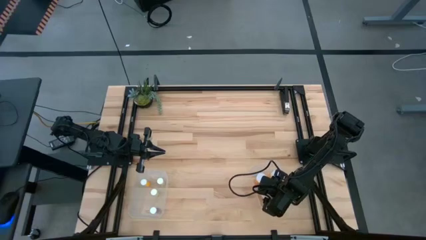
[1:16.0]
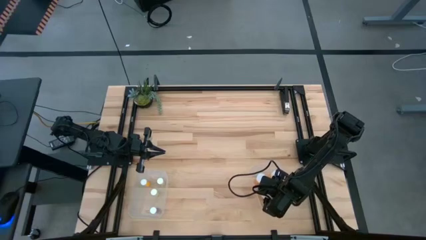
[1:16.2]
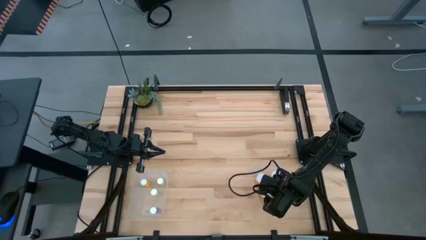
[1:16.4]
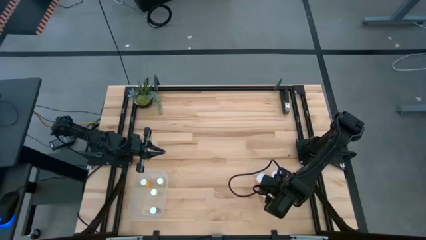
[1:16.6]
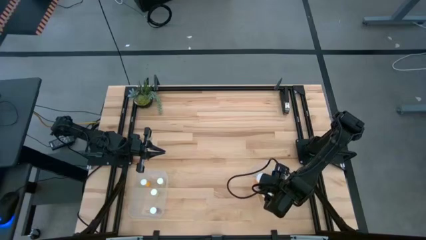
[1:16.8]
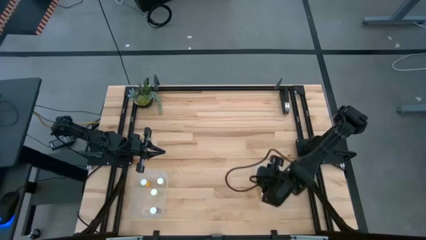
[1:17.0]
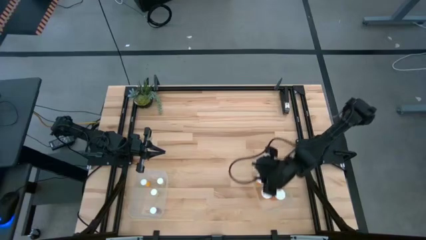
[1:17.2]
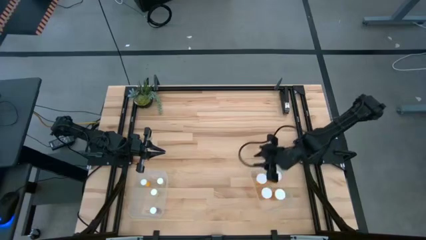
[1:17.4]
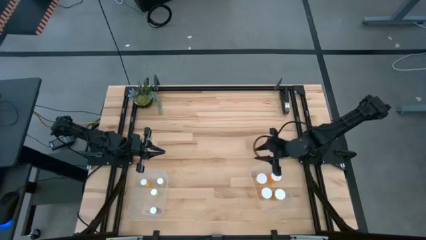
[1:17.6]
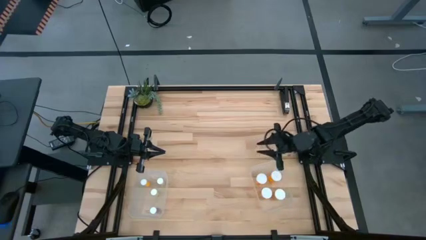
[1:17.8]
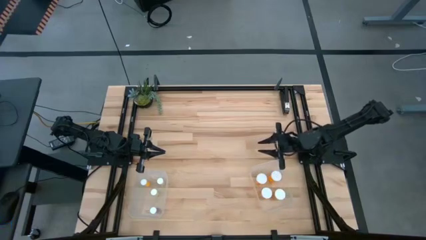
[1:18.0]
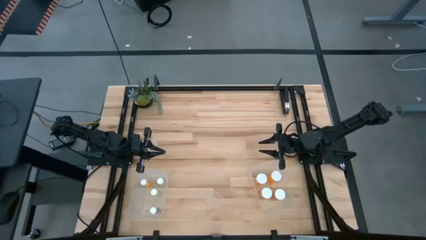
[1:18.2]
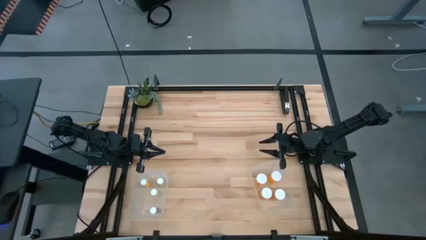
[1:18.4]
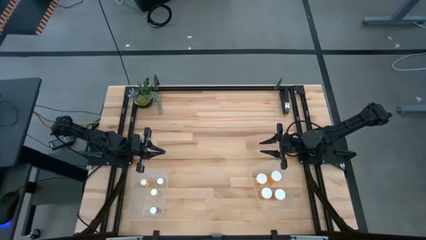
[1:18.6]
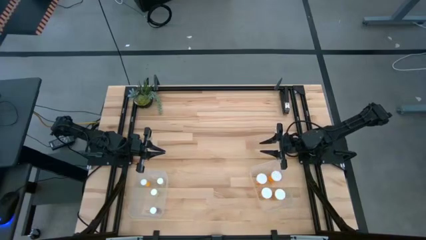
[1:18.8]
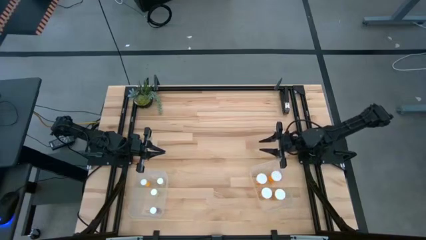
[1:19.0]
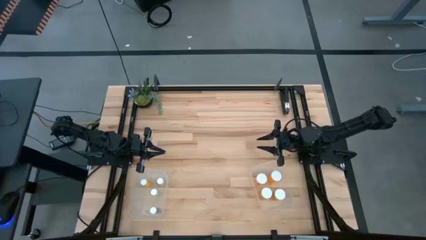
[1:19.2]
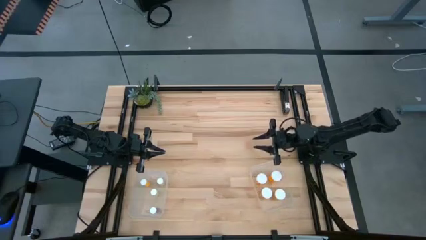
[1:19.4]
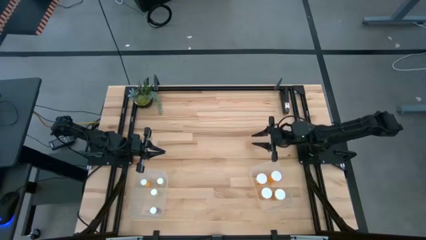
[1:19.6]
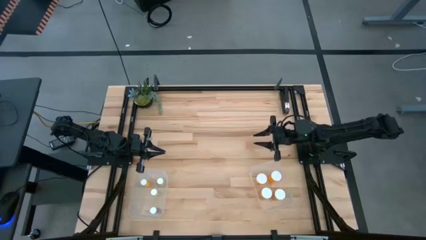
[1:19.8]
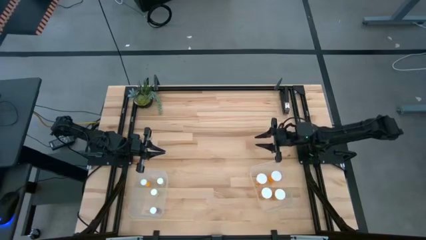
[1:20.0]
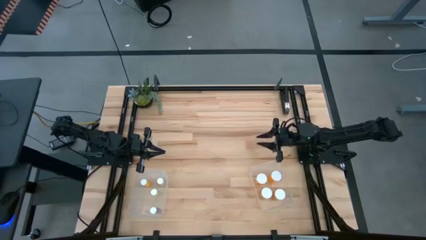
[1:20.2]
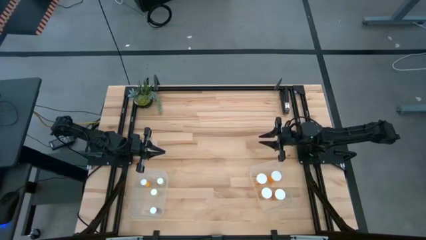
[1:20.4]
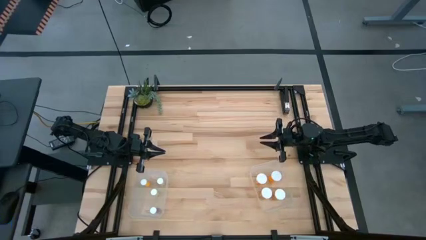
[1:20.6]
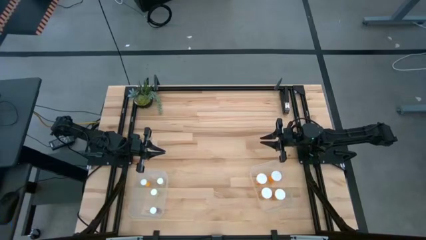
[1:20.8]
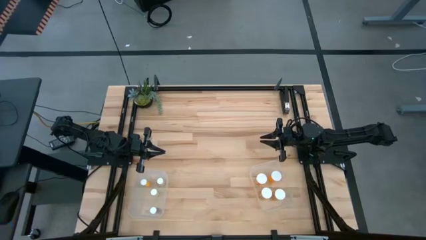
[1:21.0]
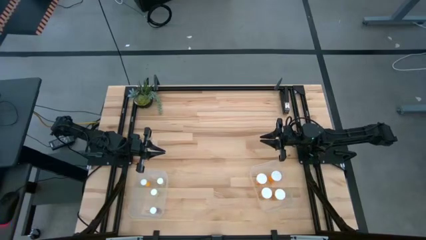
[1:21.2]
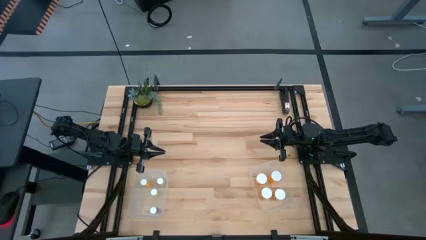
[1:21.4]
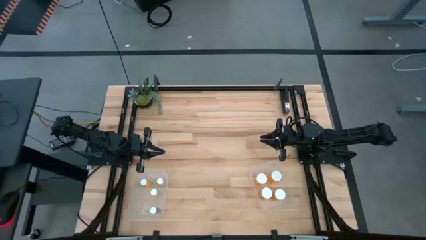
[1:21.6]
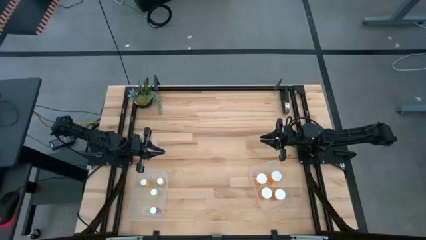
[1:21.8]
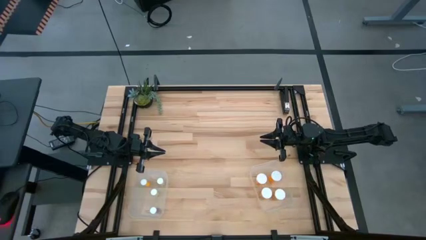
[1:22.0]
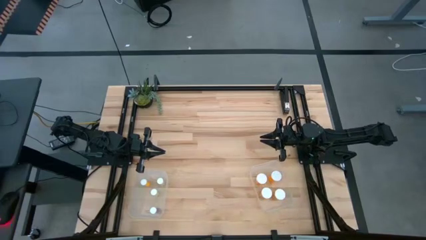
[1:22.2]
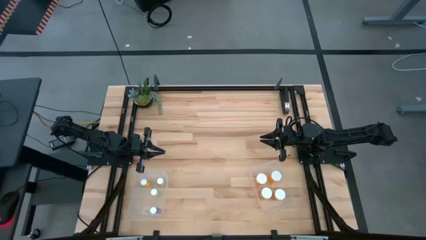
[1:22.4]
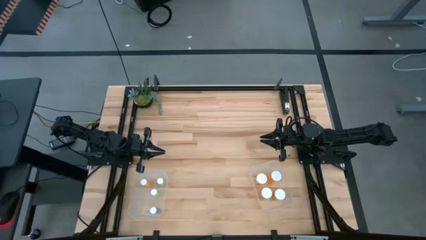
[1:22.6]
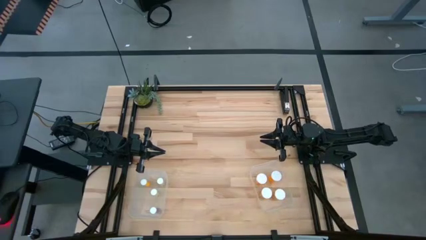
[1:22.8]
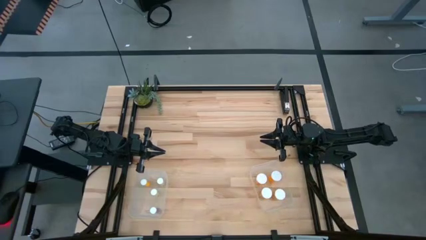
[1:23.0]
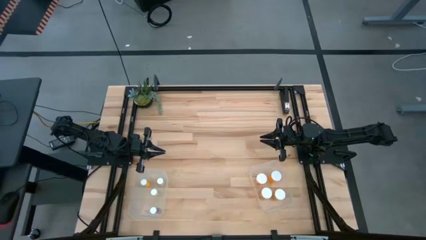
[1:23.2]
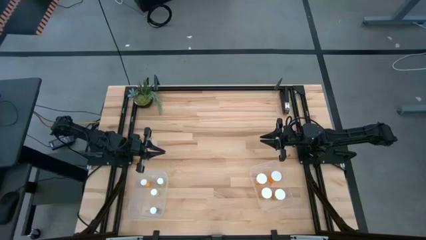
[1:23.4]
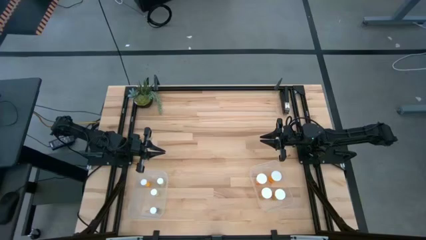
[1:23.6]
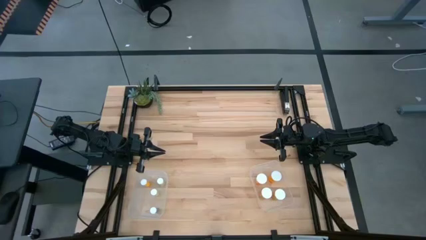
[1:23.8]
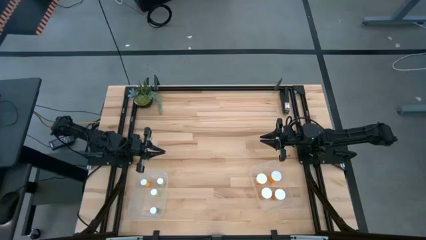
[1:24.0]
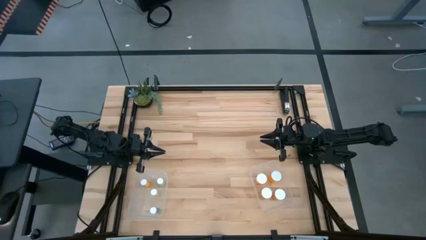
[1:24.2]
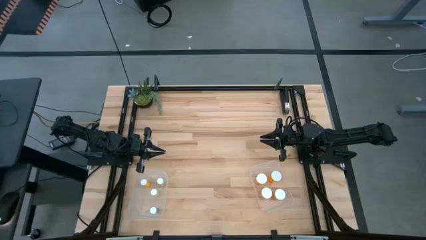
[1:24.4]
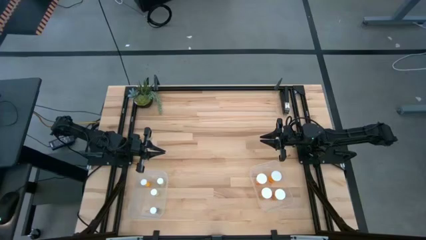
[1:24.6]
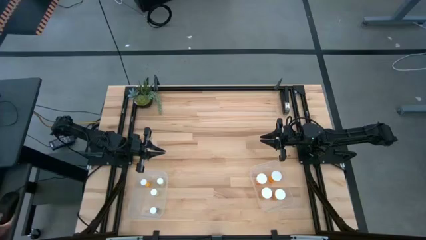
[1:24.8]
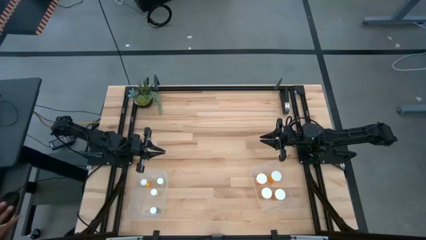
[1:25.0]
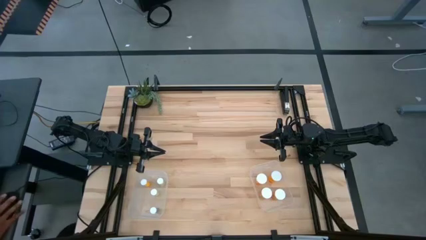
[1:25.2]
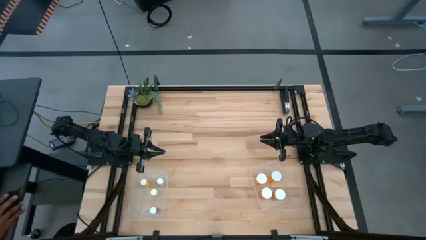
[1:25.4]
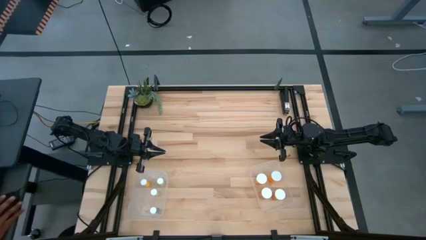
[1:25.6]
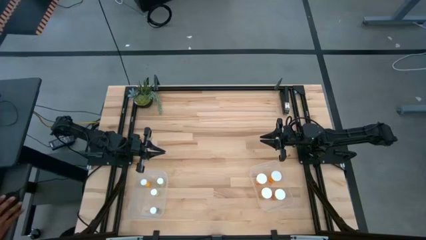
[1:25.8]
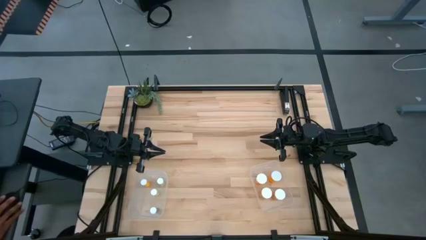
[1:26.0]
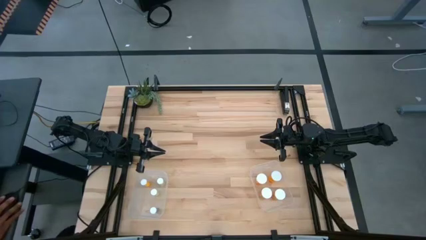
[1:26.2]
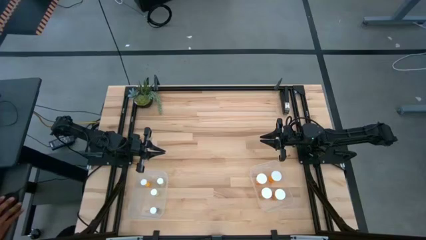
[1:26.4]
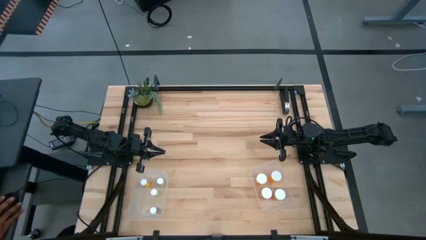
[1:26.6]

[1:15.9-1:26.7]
Task: Pick and place medicine bottles into bin by pill shape (circle, oval)
Return to Home Position

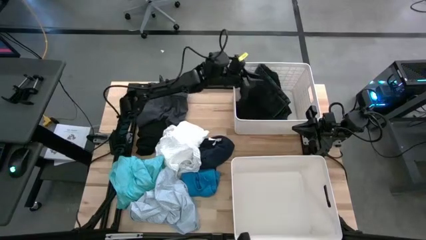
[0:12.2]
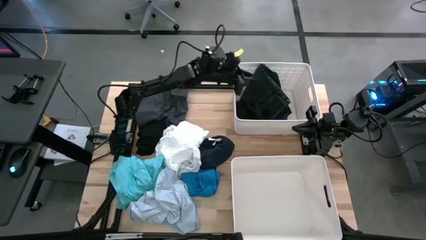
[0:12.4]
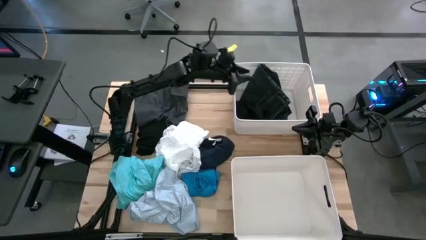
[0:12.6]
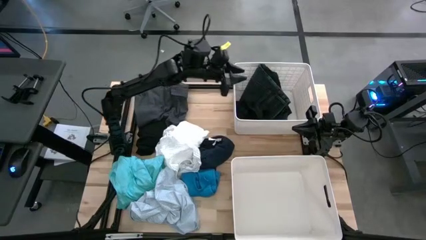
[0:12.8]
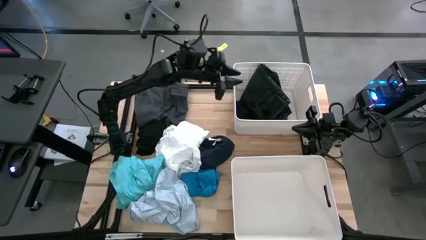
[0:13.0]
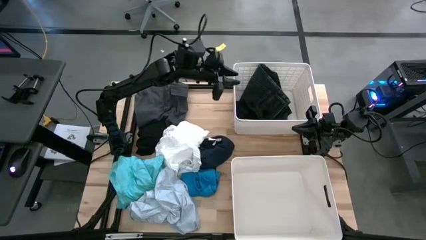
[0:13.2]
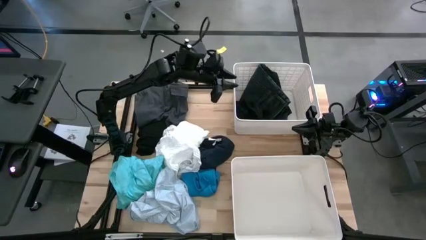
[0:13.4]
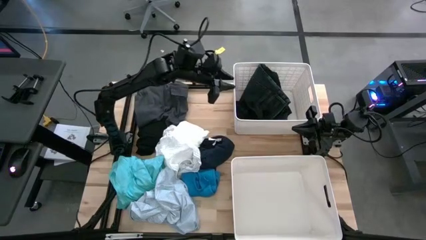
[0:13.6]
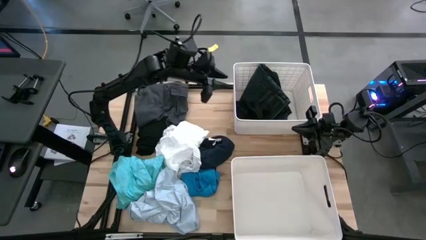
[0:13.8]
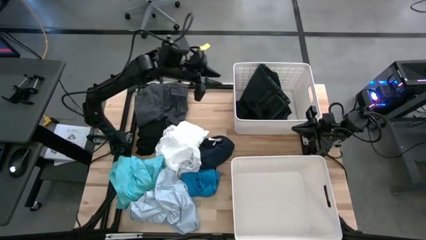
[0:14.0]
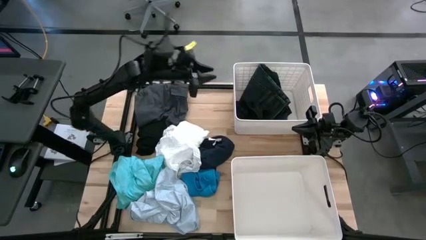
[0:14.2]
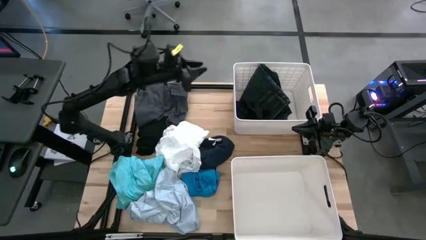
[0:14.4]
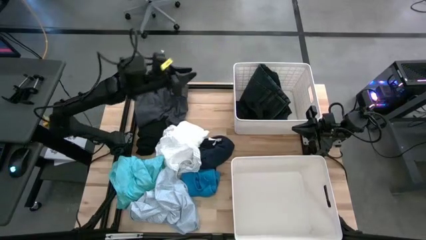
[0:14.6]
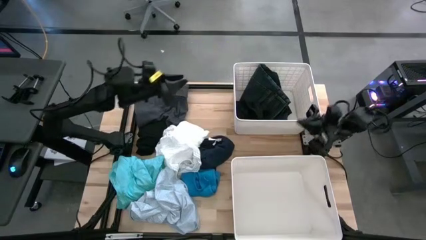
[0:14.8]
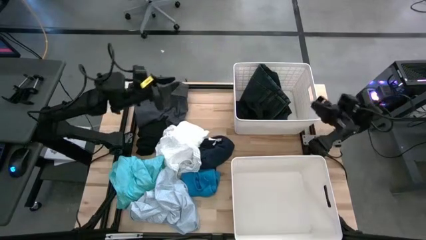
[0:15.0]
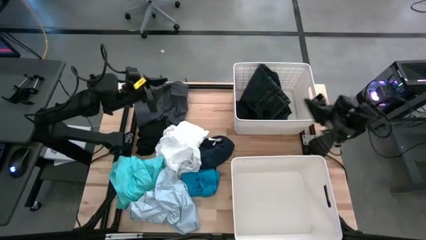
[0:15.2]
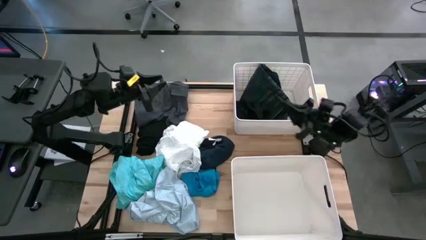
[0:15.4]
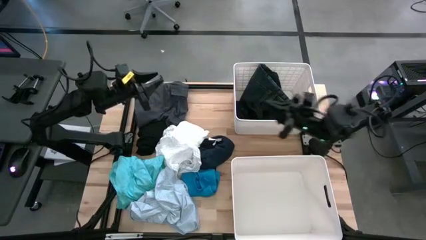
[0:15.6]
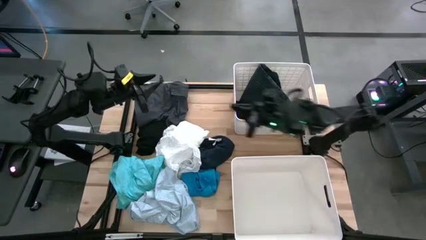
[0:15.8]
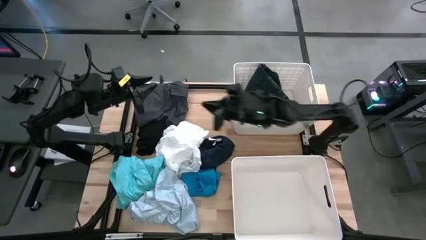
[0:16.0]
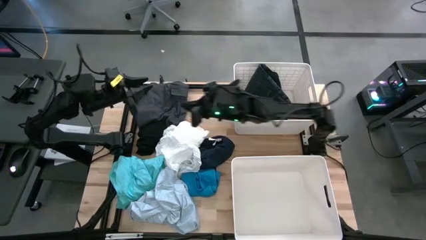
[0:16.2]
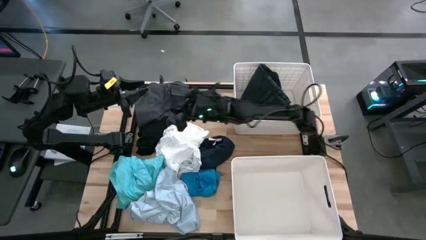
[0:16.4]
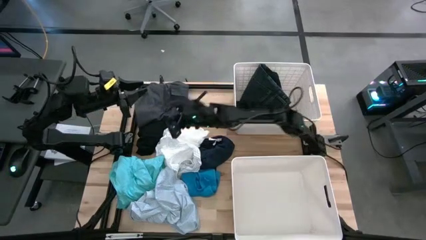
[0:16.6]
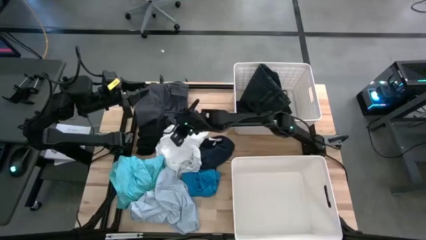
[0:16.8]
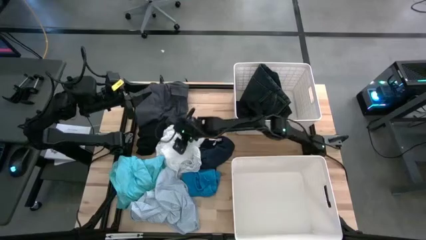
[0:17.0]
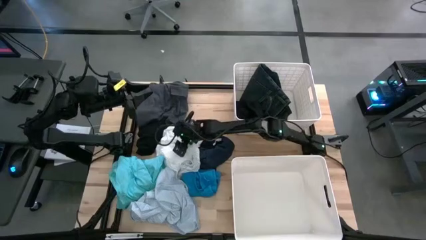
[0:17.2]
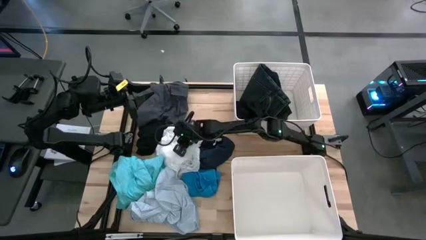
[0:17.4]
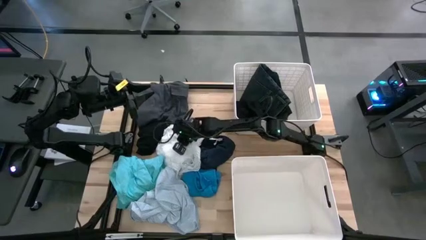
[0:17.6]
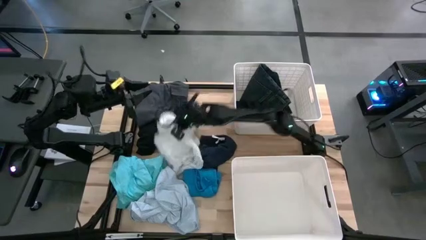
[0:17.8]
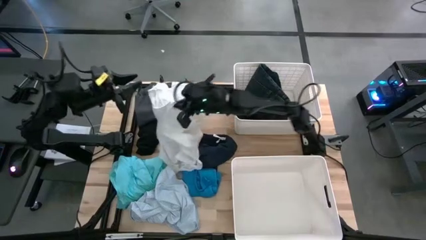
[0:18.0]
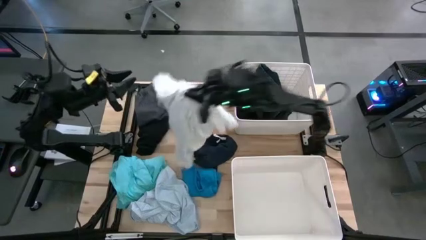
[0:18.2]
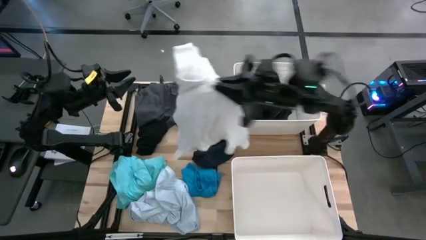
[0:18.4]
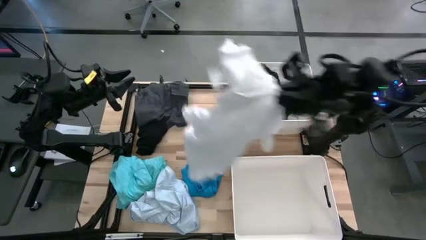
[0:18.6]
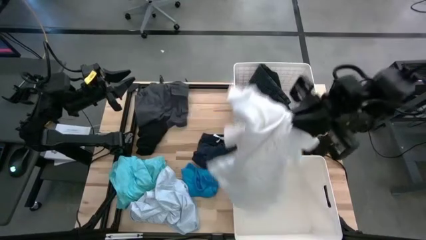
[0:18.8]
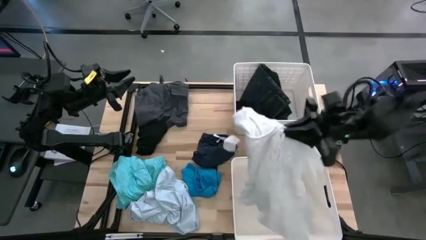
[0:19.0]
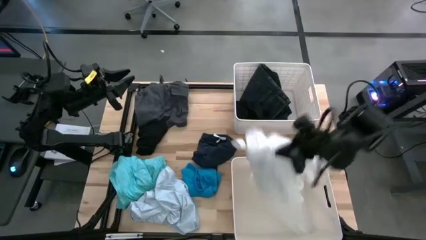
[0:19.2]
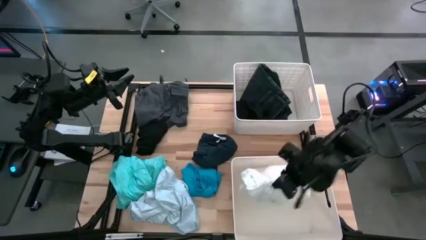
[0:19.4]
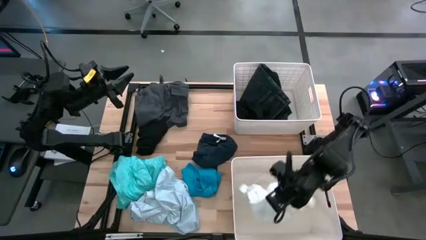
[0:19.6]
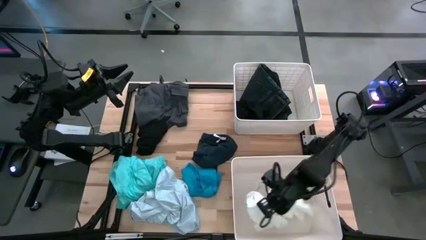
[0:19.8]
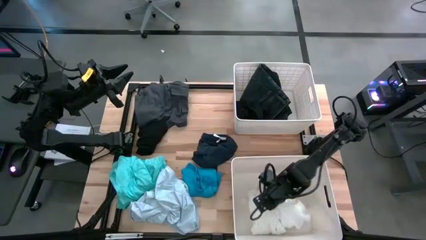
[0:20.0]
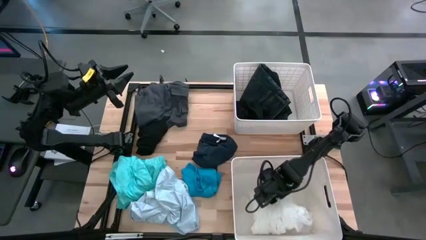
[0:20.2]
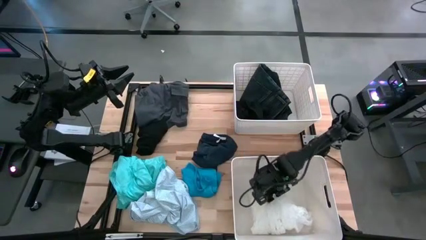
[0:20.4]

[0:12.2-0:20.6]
Task: Sort clothes
Put the white dress into the bottom white laundry bin
